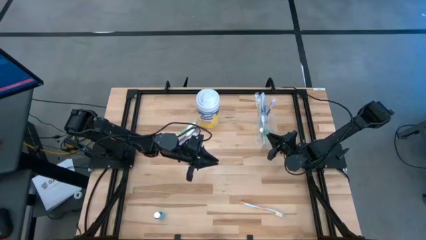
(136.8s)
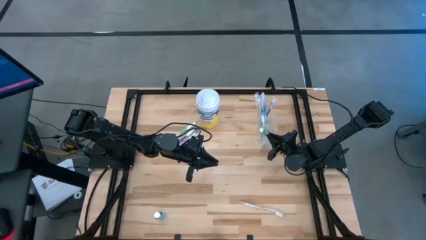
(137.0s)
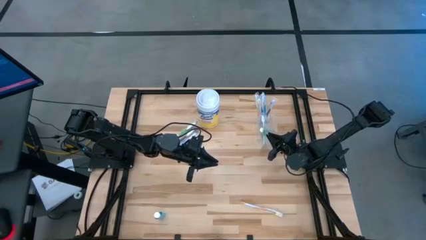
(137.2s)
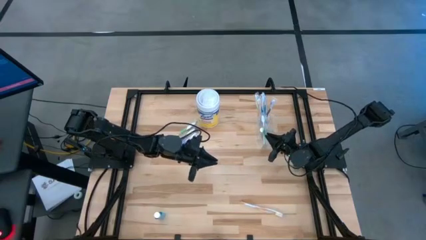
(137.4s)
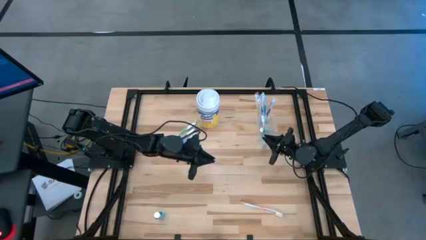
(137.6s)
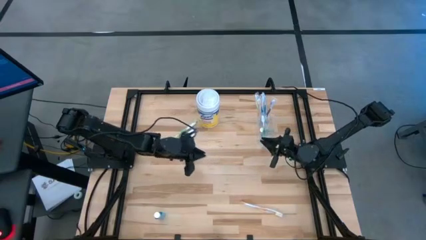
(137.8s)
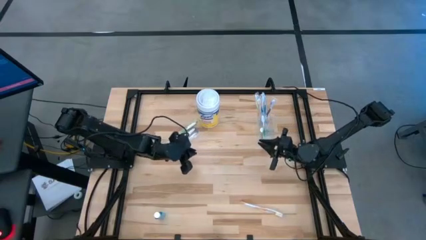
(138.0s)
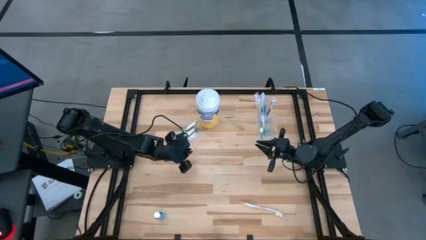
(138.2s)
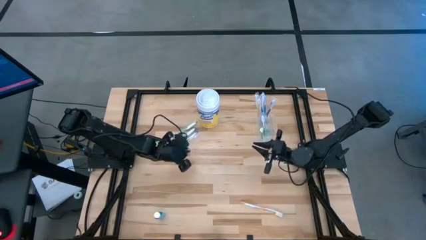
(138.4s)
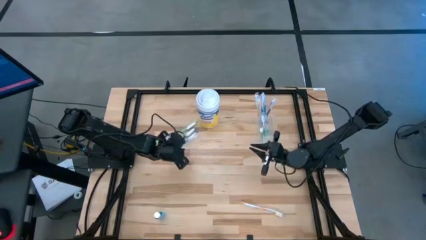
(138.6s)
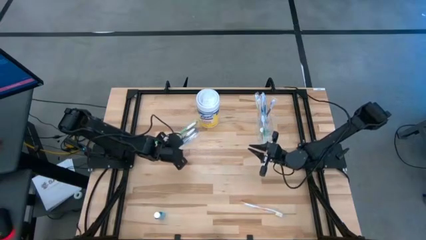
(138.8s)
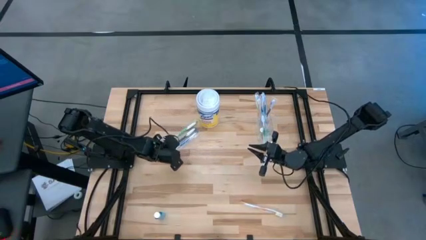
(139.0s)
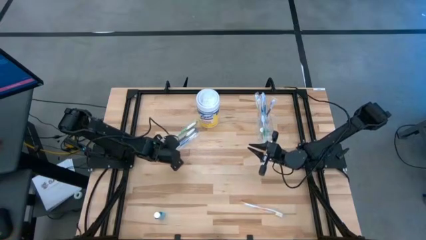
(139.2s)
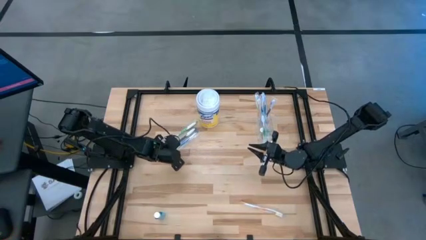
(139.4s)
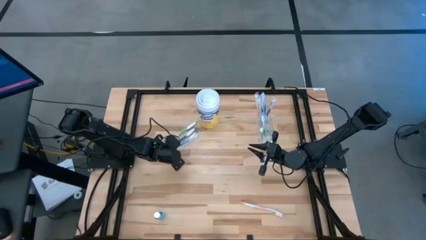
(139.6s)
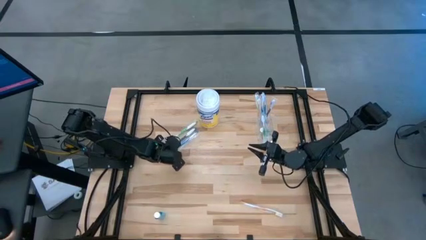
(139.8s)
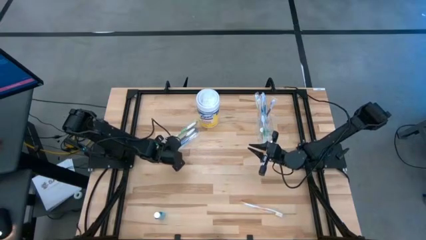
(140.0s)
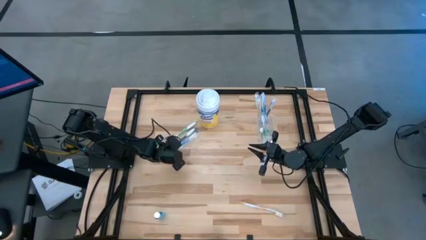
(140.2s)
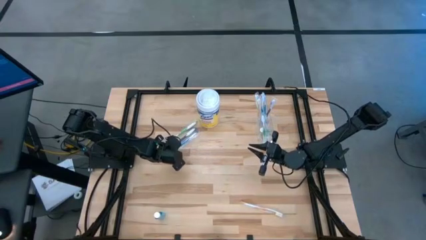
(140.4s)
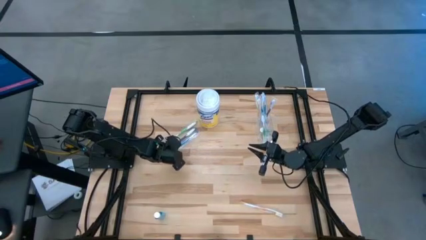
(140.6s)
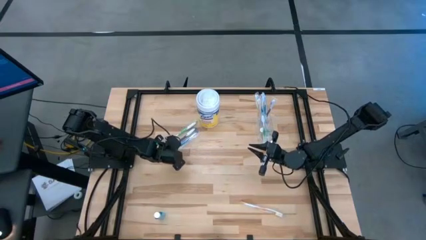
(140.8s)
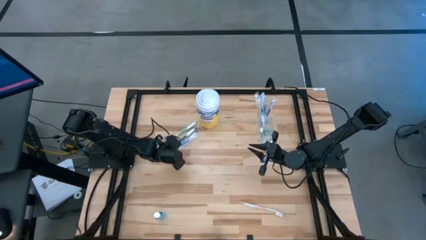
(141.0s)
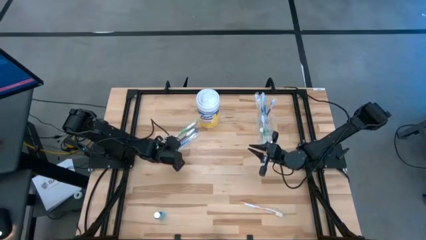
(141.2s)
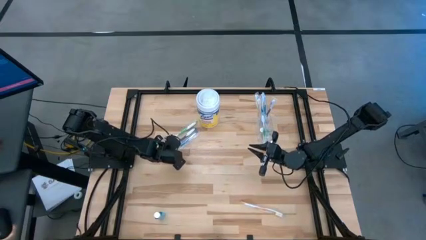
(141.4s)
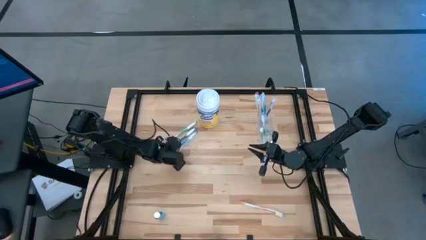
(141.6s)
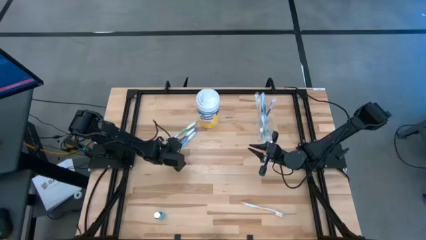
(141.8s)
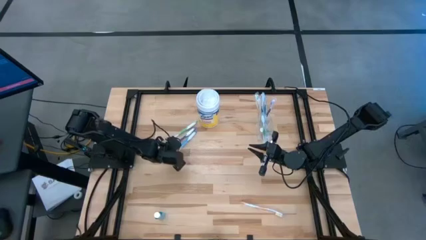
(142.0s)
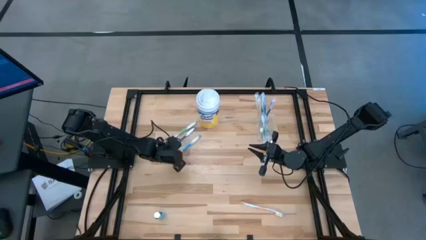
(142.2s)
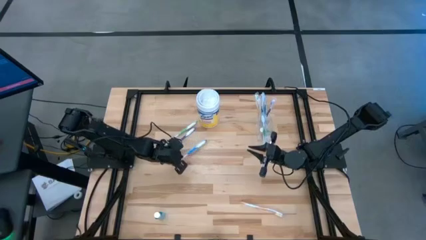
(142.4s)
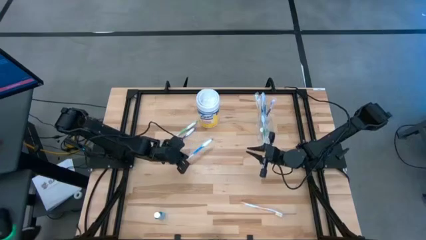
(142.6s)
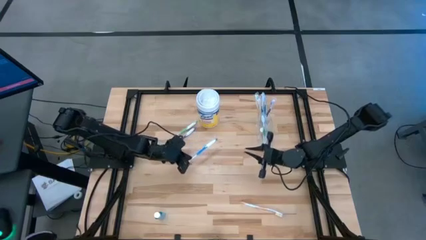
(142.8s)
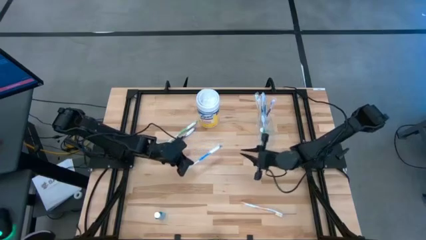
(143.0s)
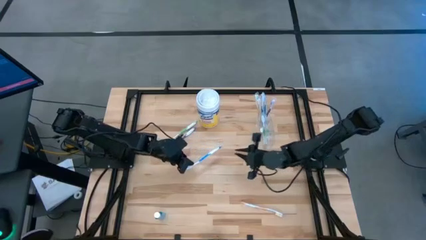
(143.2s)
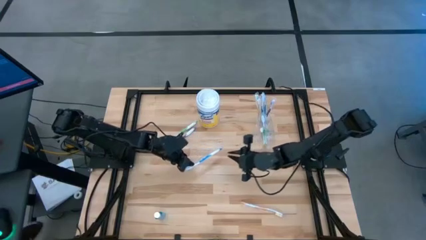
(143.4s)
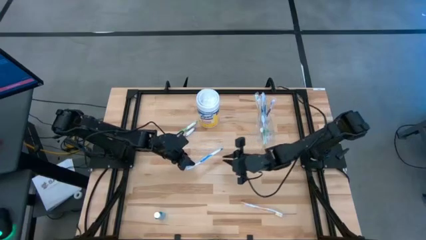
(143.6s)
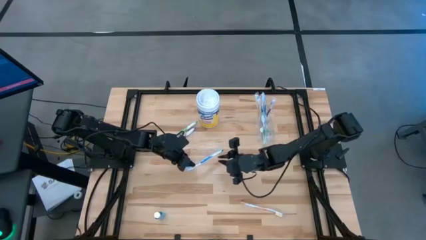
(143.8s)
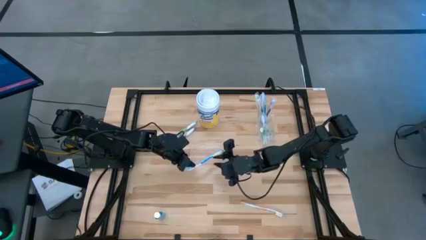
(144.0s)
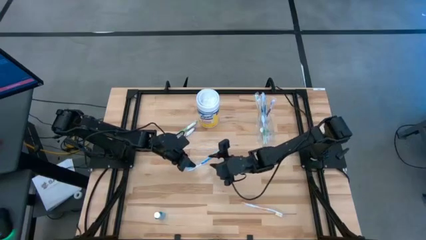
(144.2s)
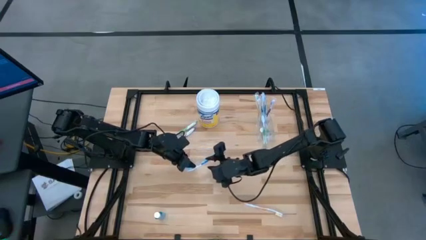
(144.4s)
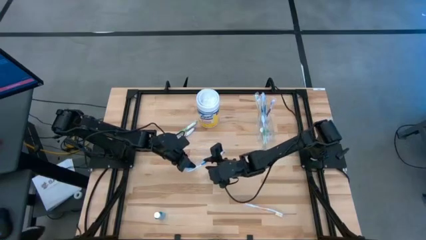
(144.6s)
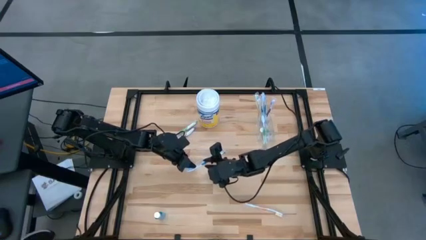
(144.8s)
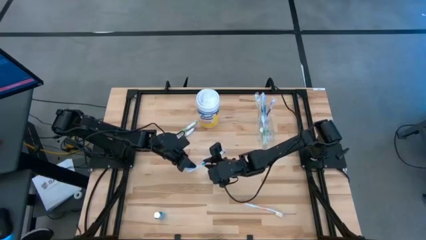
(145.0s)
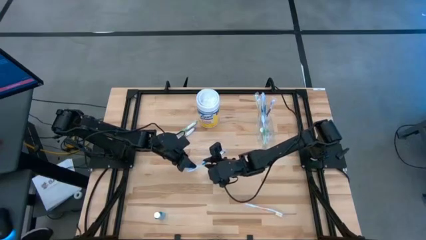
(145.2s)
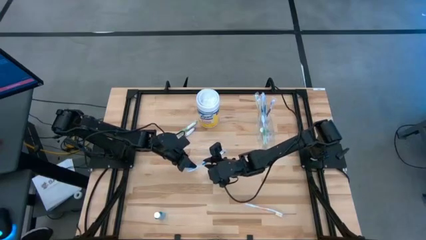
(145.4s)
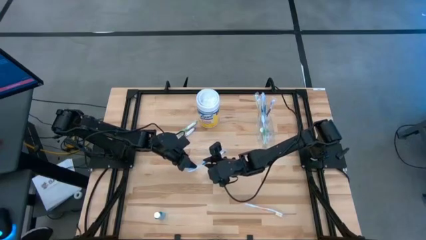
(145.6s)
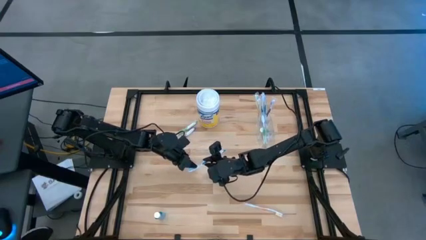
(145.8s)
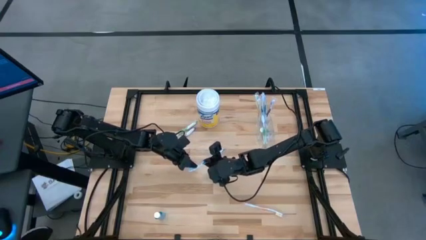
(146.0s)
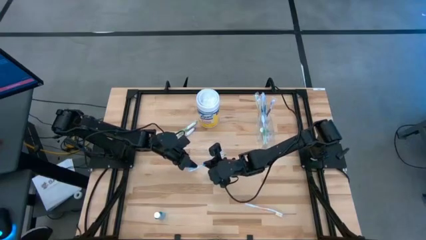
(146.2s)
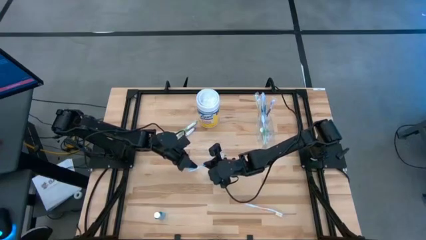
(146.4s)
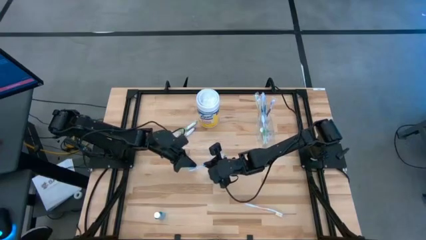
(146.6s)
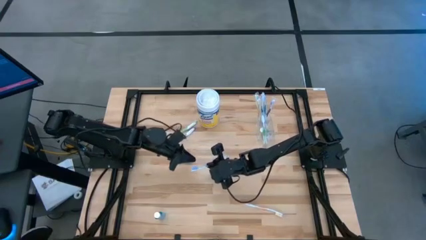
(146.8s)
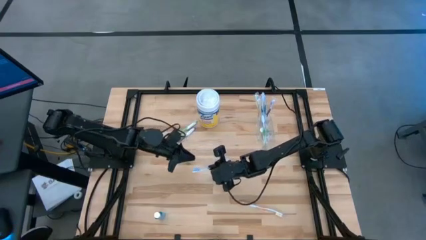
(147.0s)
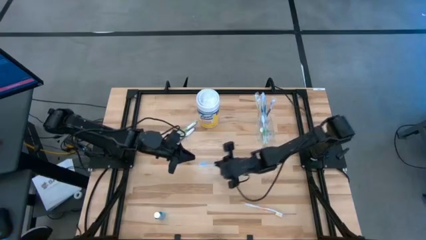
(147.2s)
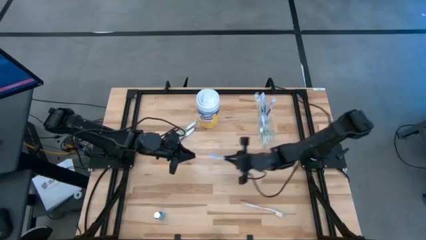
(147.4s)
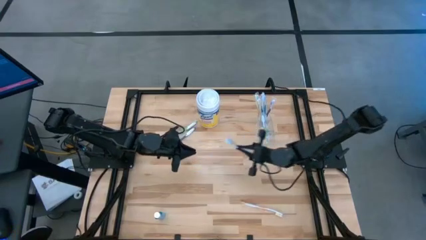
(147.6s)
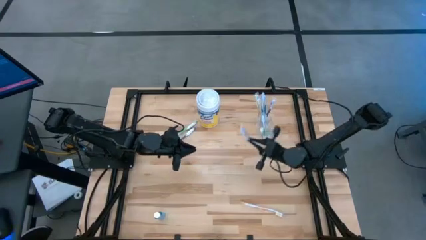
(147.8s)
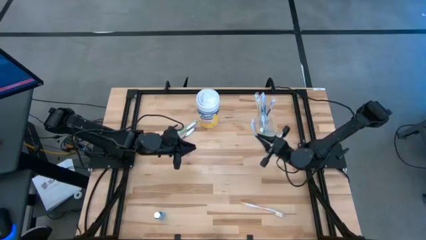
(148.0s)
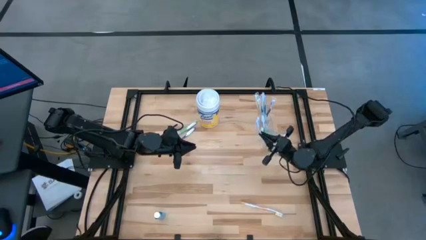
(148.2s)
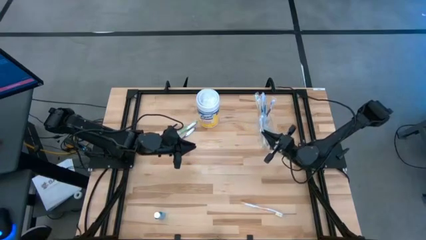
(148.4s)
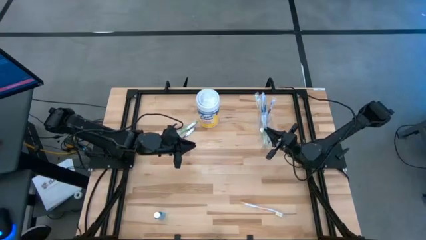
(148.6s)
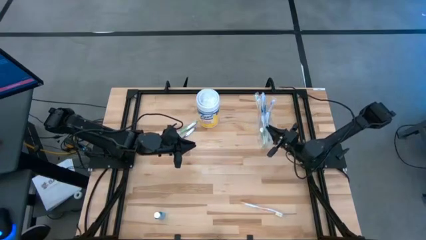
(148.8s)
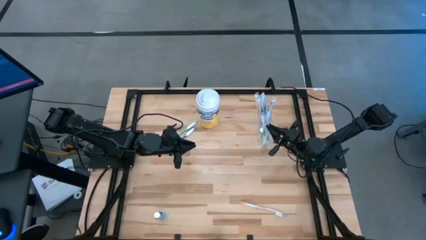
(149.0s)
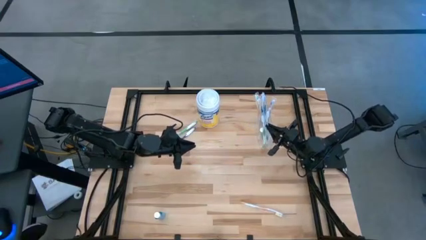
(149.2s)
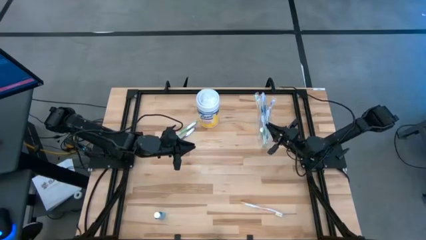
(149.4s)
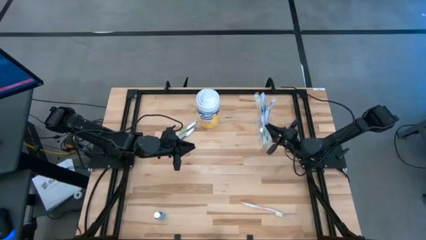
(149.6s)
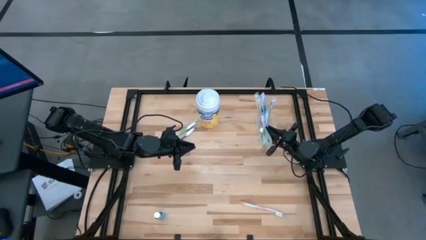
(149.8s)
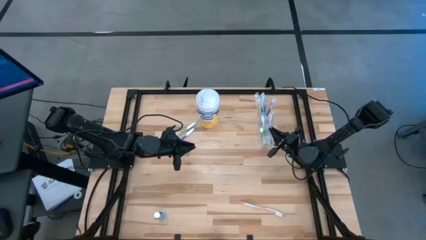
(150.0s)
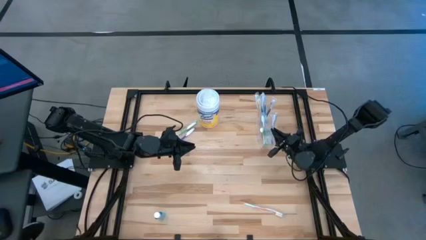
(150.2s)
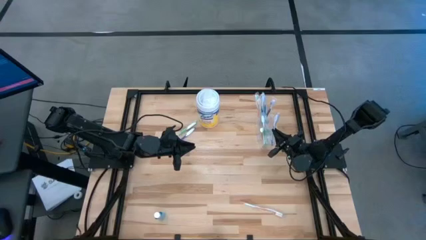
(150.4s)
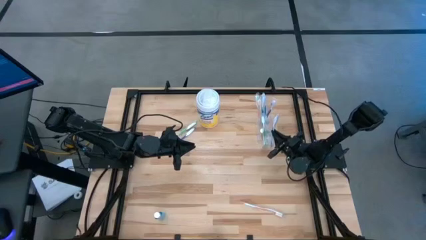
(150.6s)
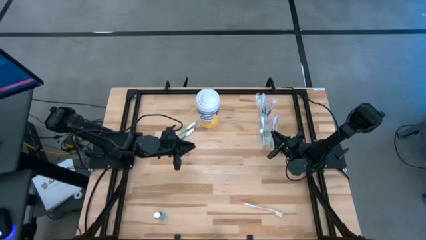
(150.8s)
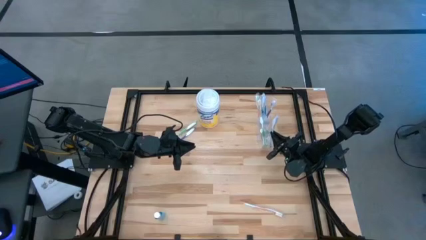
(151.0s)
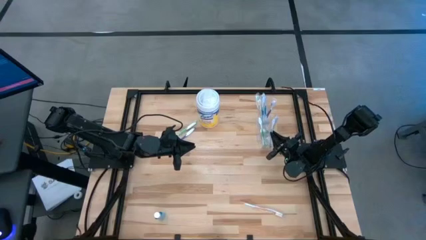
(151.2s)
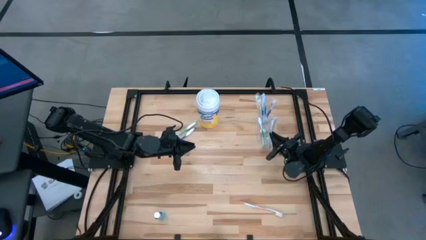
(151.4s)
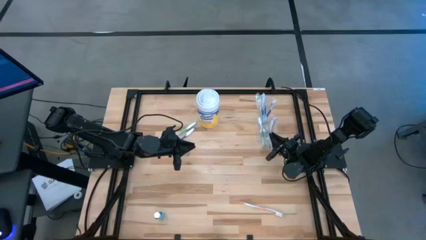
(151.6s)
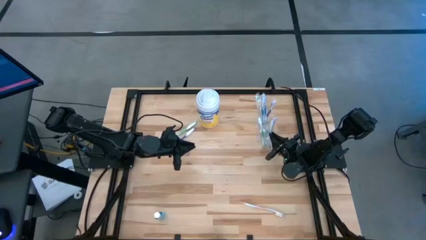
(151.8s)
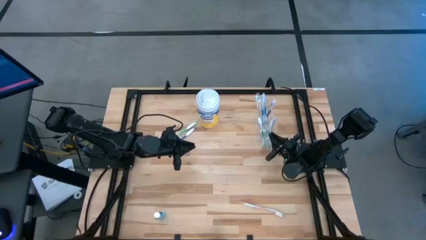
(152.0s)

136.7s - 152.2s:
Task: Pick & Place toothbrushing station
Put the blue toothbrush into the transparent organizer

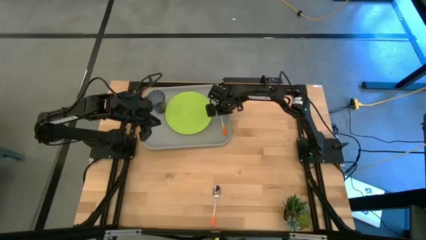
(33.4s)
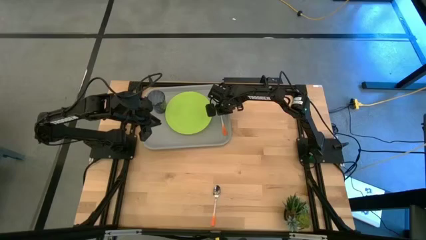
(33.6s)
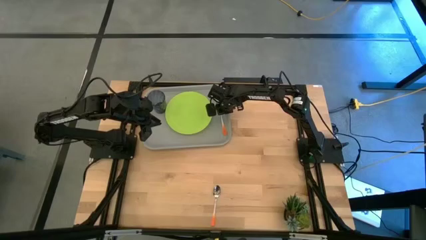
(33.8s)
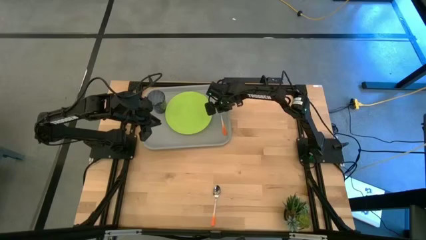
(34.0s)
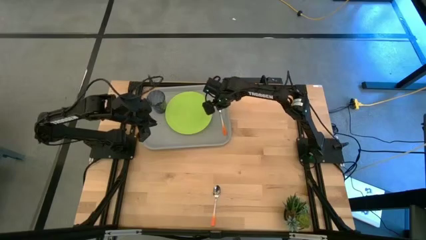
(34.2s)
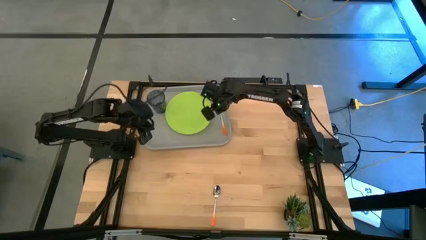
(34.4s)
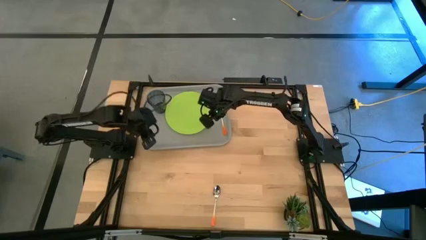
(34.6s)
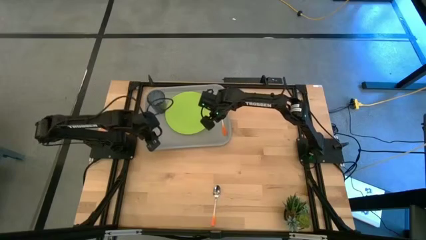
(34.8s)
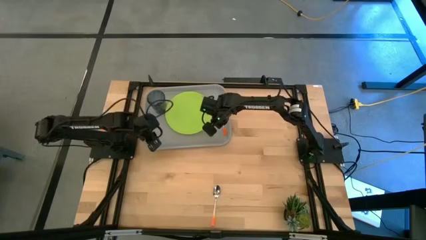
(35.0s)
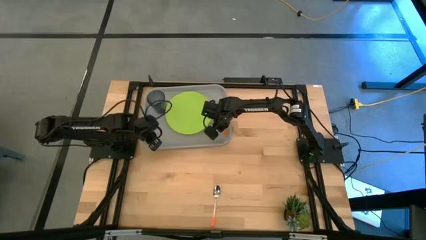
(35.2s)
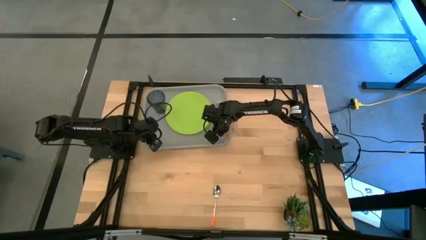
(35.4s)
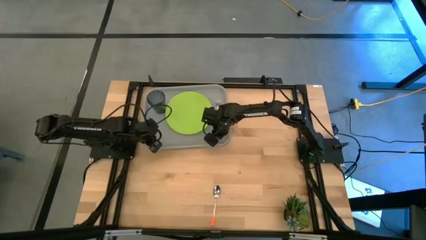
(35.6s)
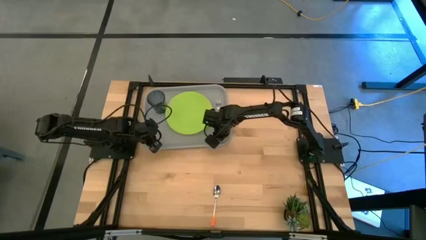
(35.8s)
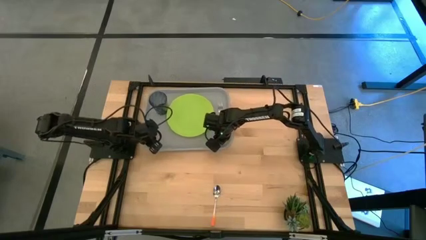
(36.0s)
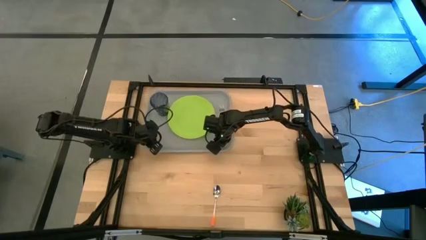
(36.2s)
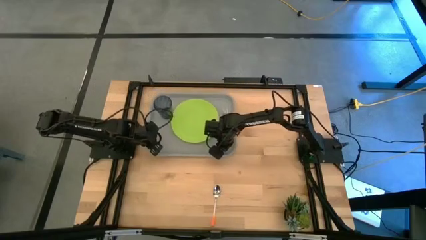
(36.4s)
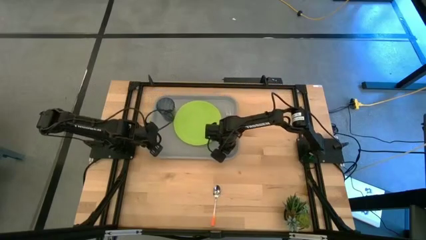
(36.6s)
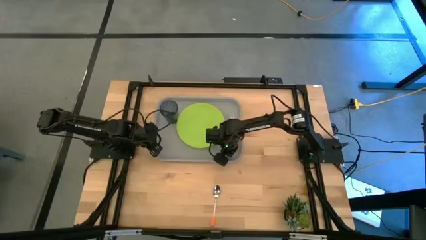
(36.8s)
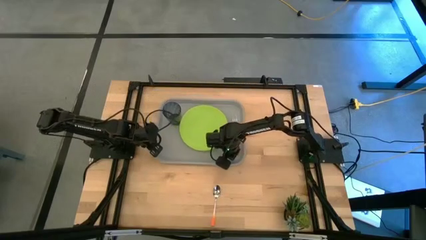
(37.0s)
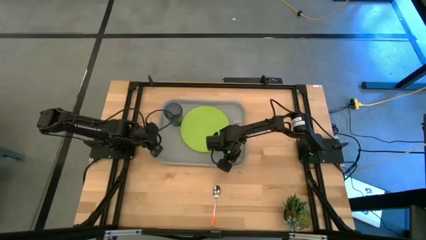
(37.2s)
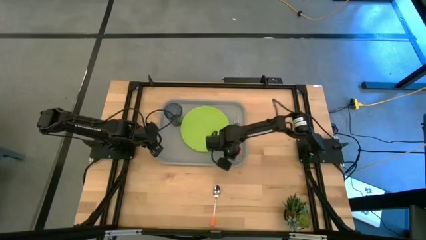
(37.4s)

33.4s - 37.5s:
Task: Pick and place plate/cup/fork/spoon on tray
Adjust the gray tray
